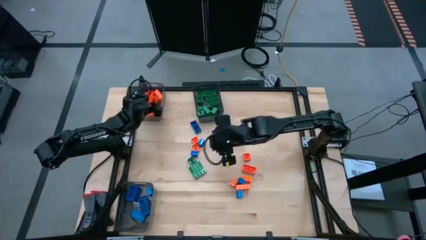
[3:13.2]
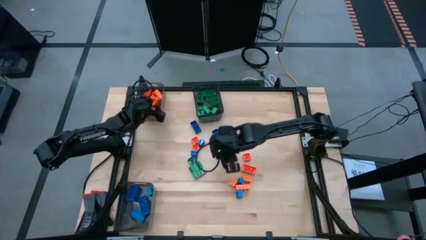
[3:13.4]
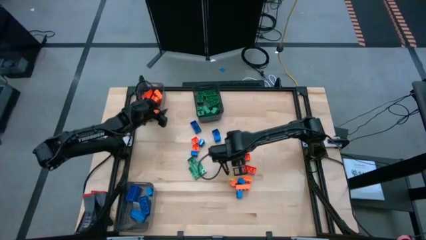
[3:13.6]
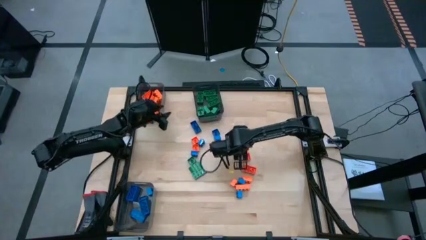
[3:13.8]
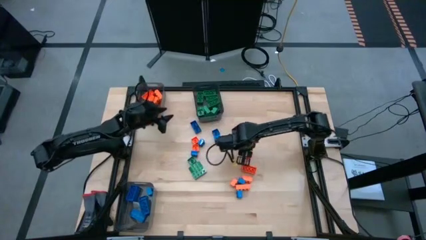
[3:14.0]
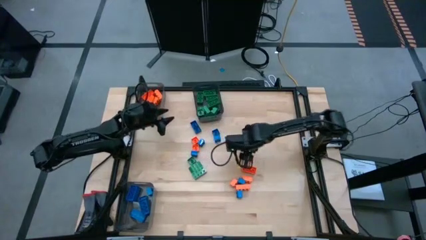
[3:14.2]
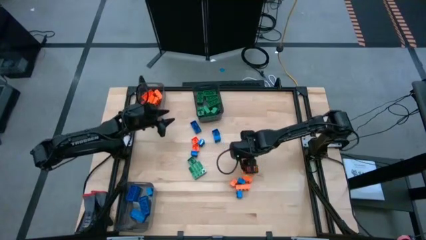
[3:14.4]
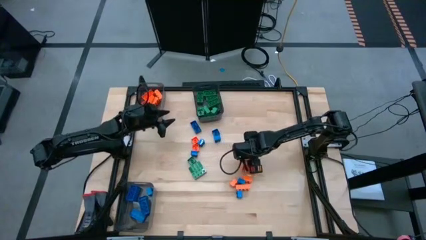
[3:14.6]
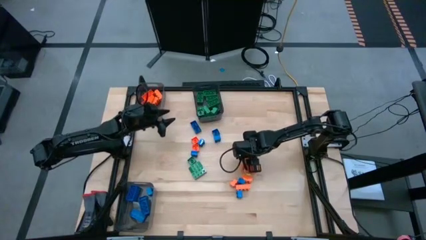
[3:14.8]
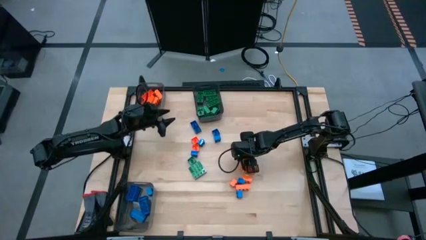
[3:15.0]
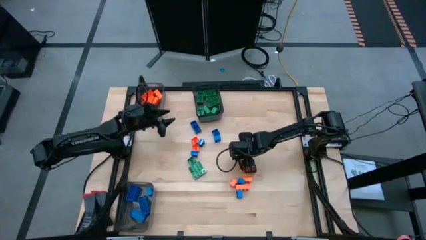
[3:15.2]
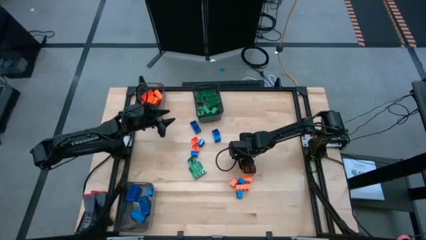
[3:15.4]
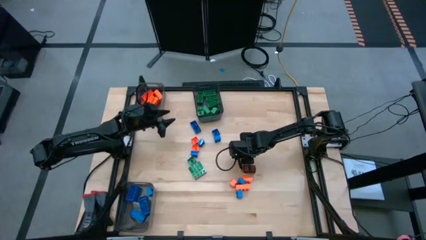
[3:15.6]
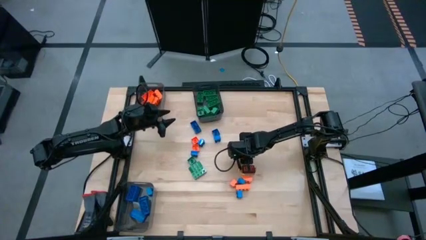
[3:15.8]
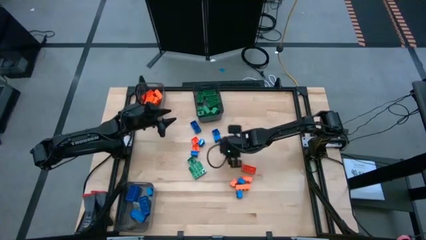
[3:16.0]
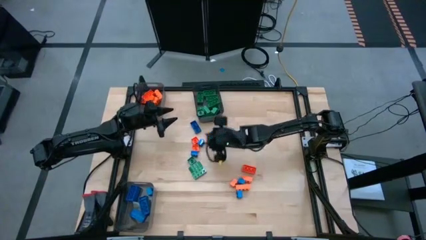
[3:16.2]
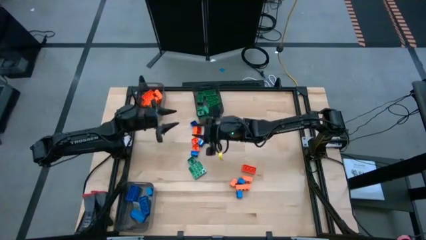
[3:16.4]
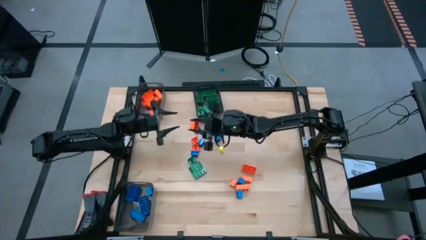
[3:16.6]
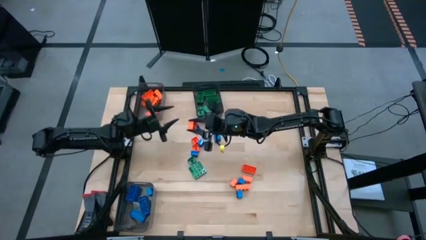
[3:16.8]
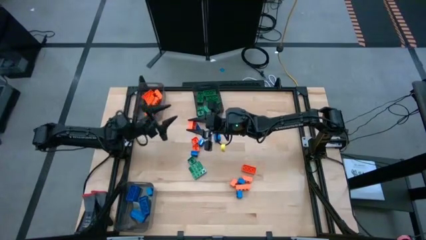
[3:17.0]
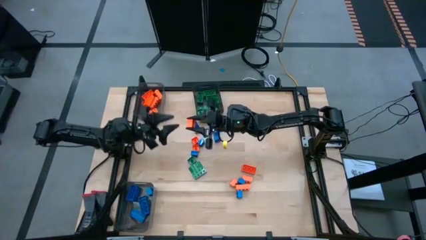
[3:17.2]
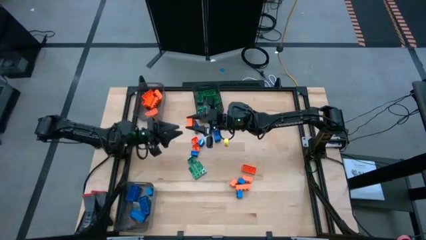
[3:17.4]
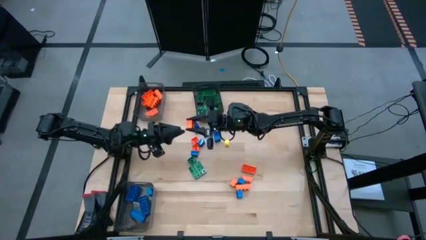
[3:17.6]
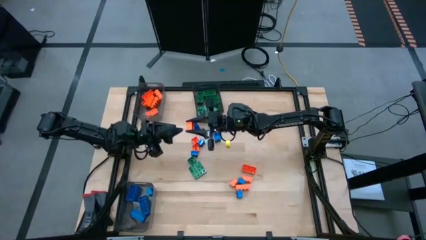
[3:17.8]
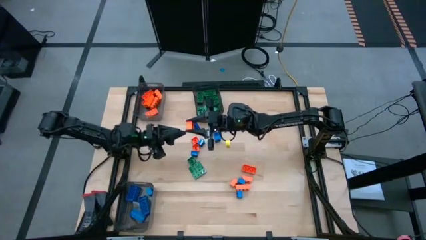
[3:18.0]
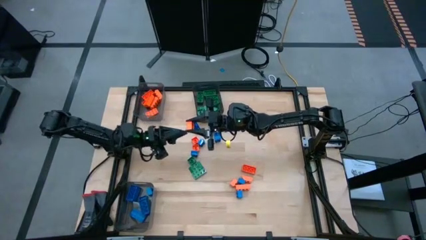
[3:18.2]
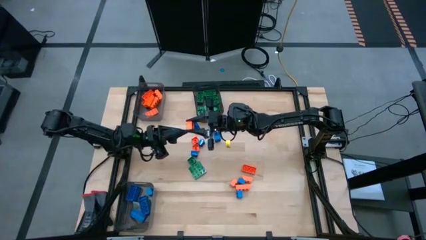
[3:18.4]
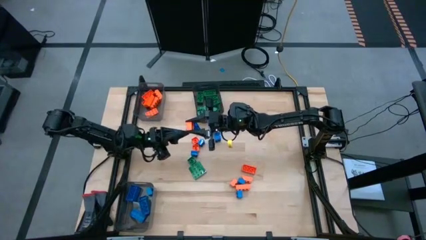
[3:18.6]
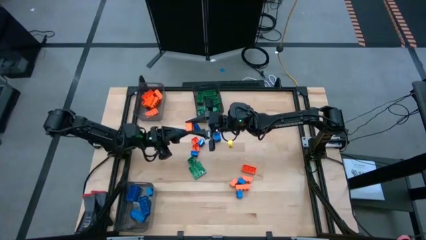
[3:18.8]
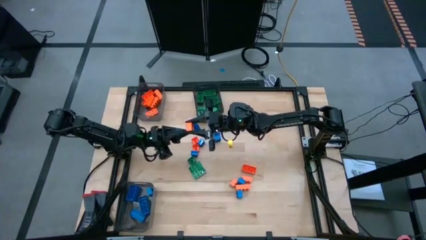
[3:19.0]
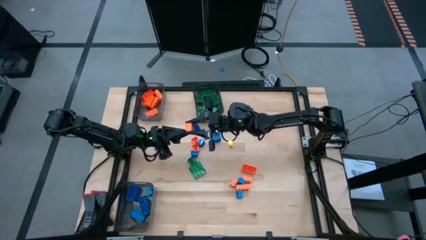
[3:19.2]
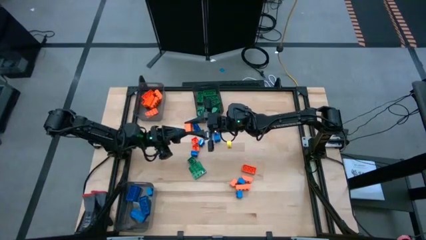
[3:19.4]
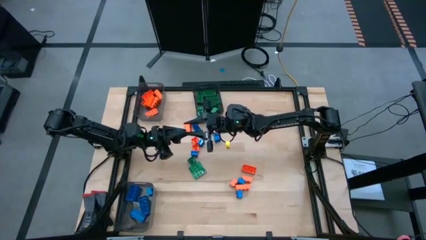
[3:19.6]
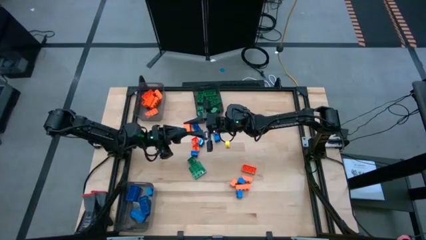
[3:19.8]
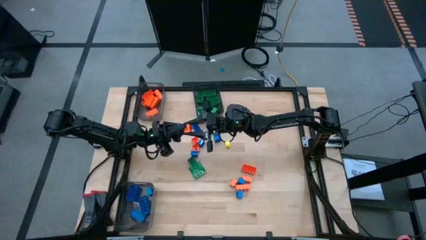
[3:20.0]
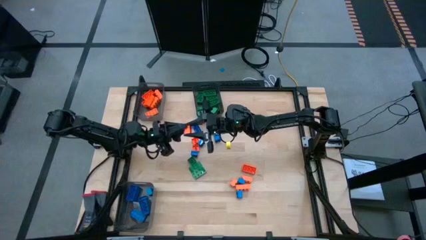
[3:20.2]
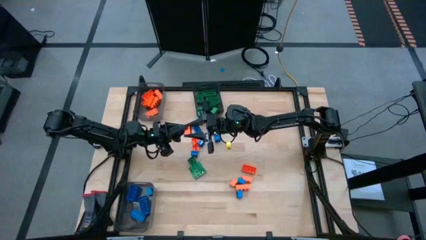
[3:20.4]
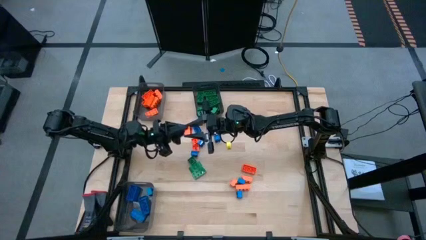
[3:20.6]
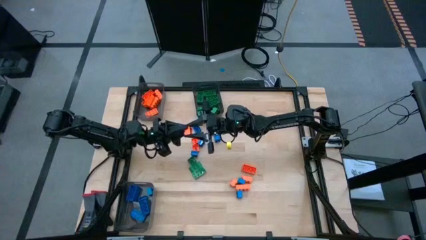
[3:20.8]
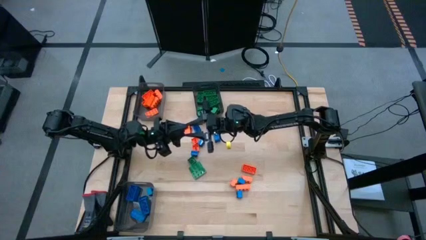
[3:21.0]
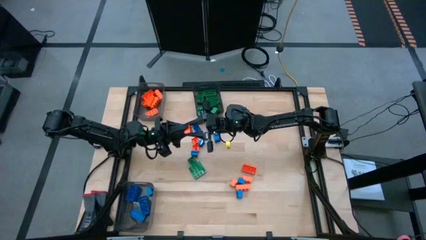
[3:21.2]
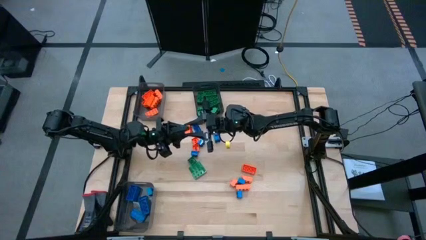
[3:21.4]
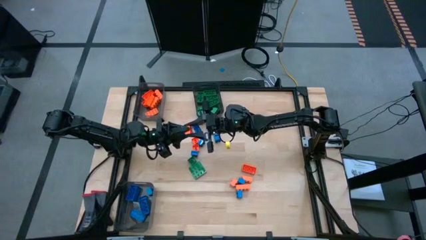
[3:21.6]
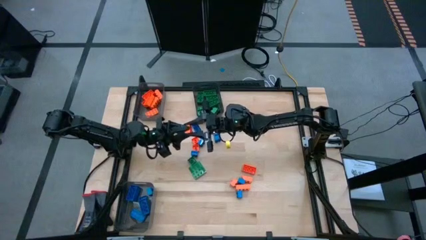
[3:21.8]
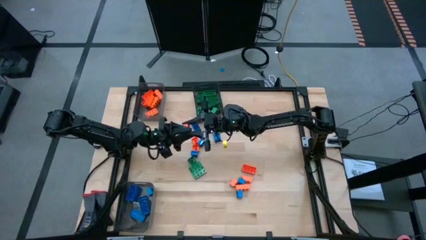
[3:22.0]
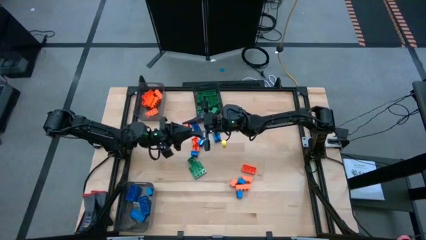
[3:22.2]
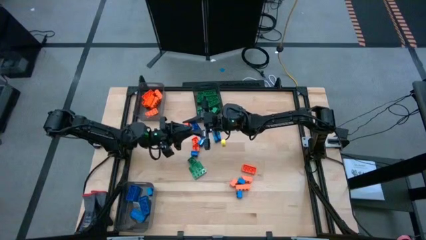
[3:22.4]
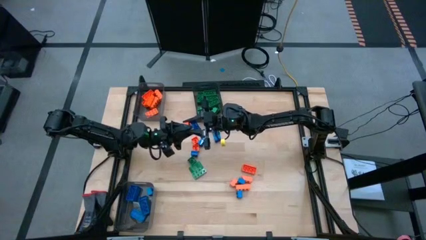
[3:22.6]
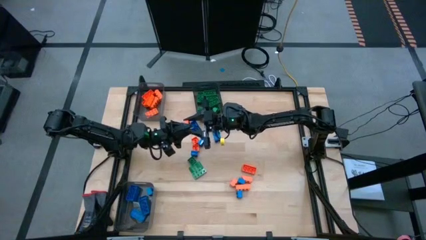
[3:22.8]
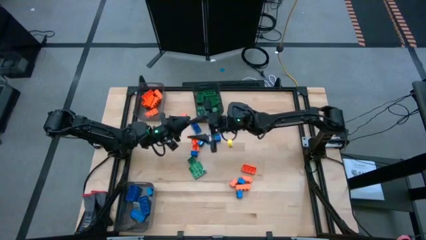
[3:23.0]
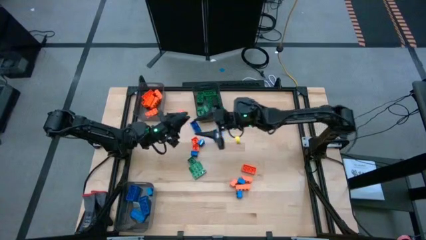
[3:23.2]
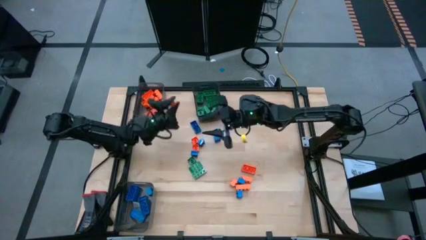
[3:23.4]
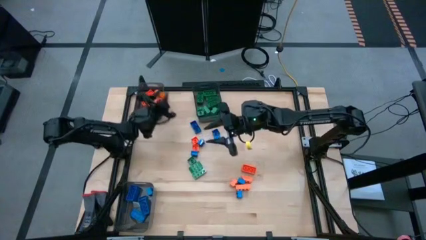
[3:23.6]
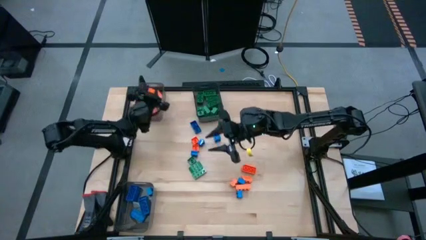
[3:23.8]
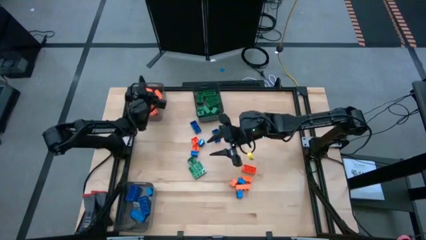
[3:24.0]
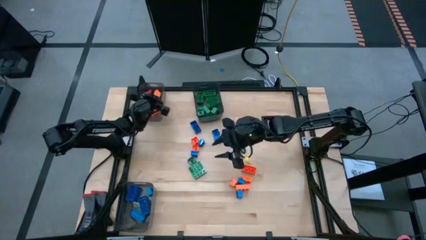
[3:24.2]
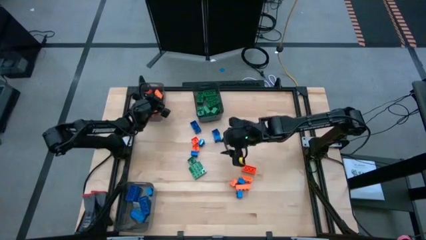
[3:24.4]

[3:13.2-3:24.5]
Task: Sort blocks
Put the orange game piece into the top left black transparent bin

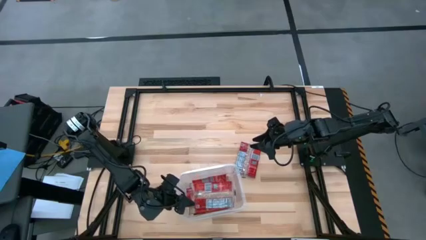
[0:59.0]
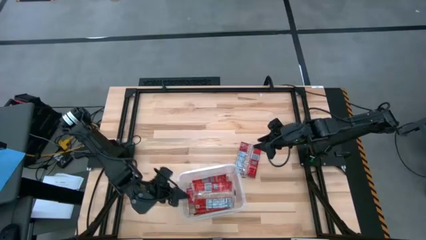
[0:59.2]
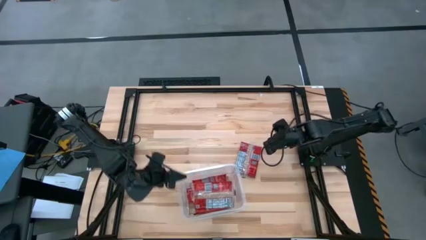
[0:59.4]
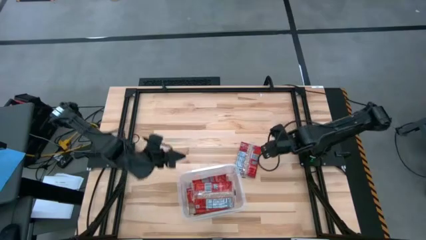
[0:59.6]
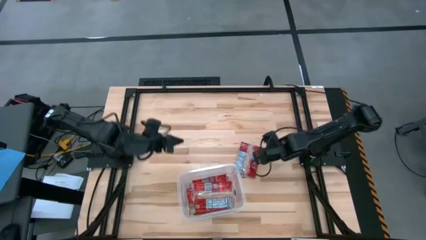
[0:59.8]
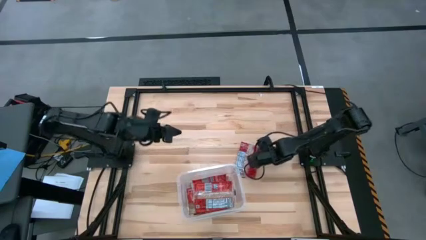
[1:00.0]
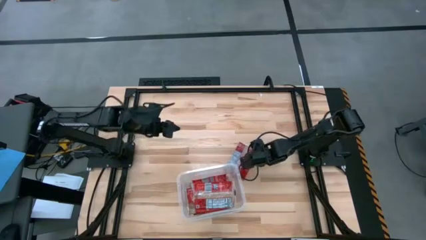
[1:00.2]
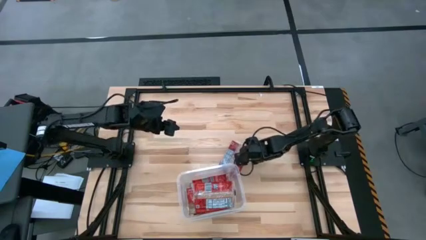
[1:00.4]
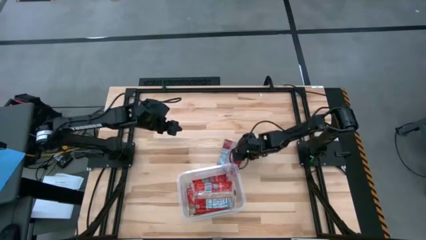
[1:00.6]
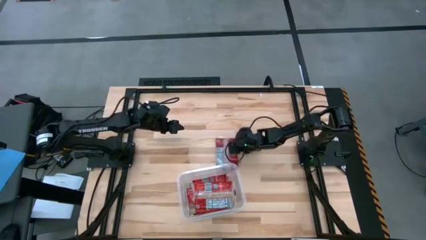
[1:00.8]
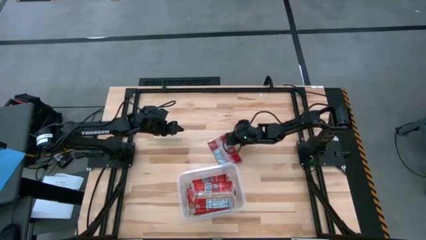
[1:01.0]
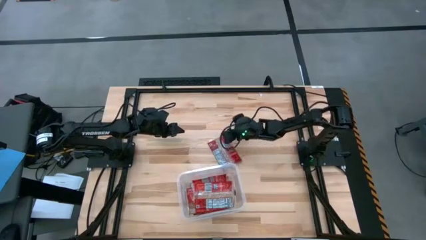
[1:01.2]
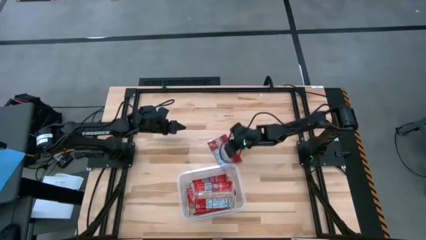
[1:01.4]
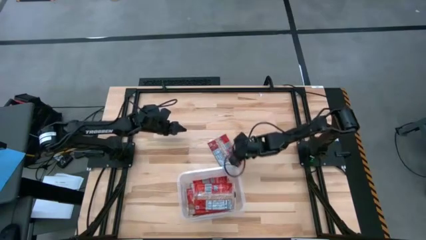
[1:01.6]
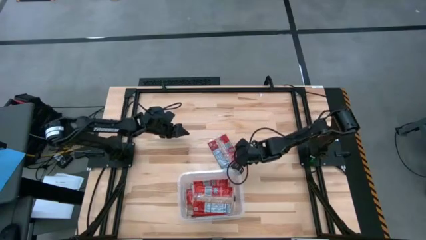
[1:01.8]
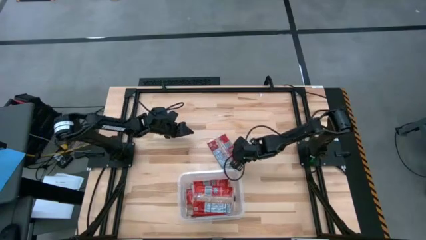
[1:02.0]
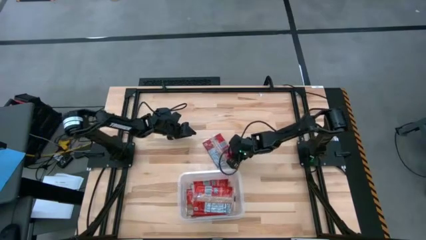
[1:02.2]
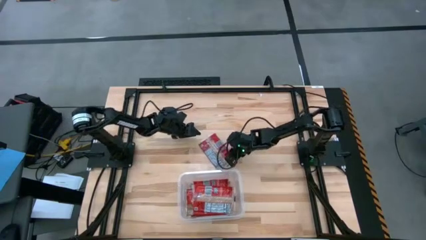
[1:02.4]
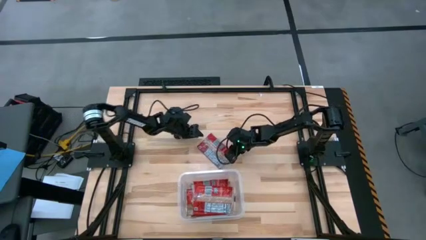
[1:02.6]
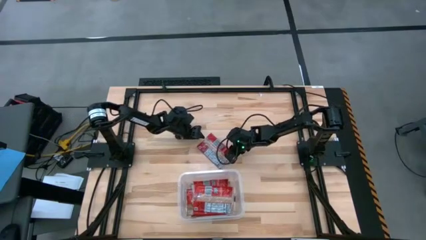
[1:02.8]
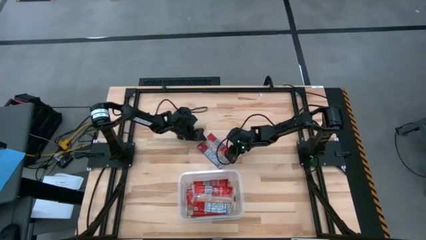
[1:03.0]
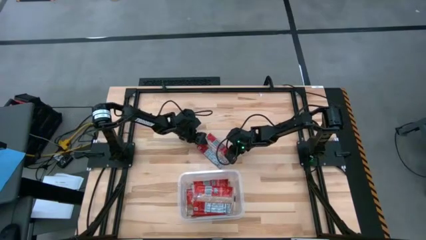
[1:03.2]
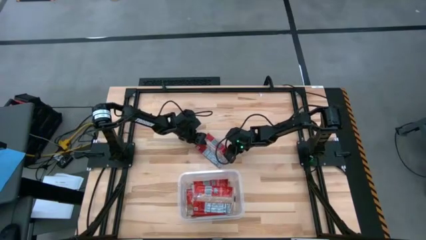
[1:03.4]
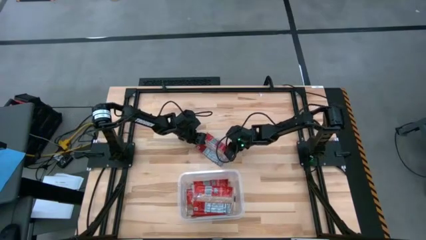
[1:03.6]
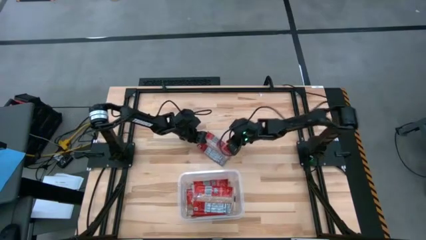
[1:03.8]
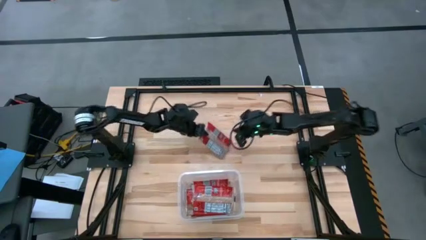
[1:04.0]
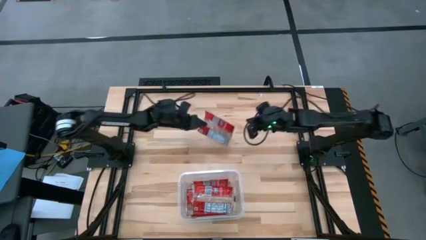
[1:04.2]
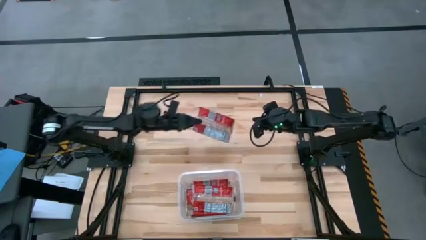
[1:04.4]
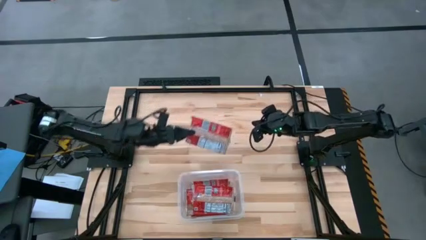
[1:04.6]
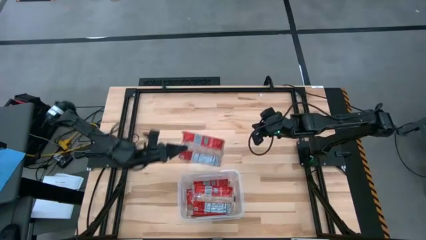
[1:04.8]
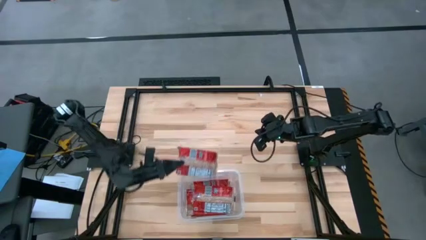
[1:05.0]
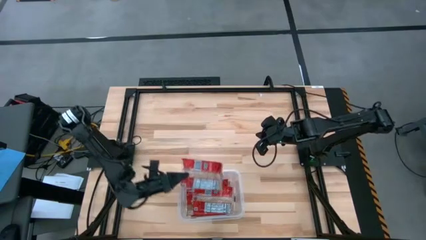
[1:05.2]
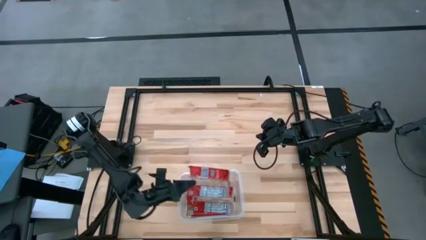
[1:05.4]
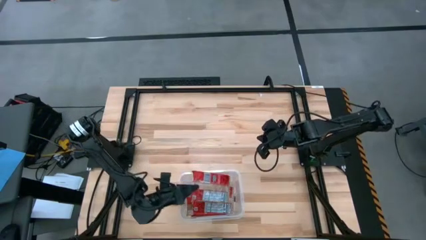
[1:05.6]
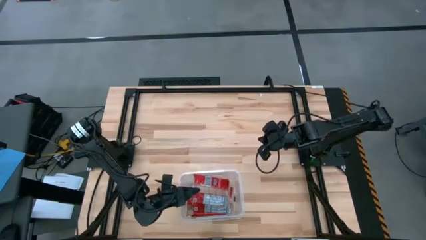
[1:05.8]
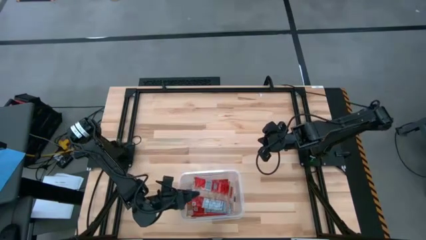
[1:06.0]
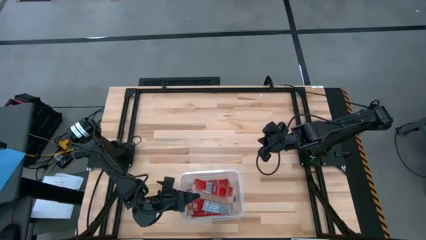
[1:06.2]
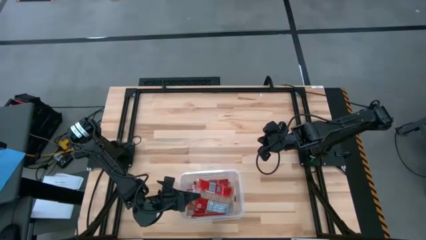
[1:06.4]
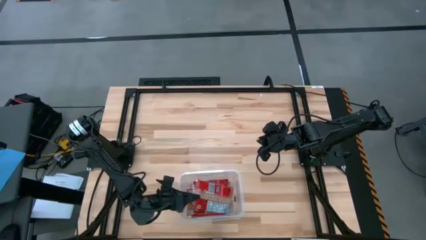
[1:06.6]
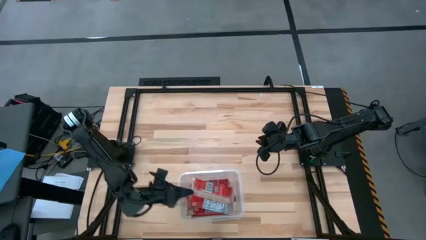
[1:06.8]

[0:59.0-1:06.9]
Task: Sort popcorn bags into baskets
Put the red popcorn bag into the transparent container
